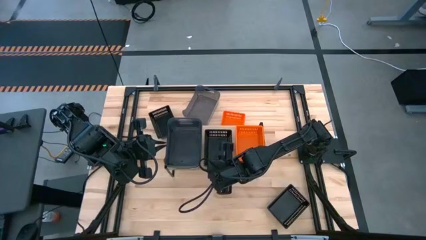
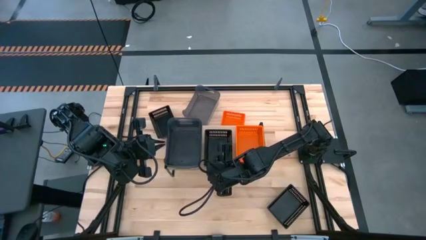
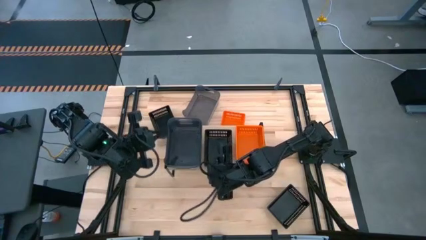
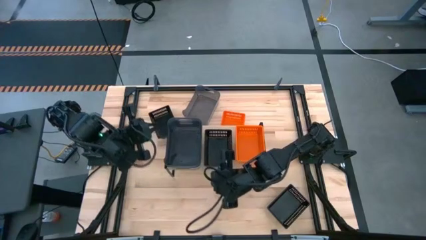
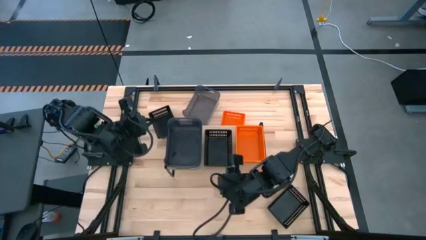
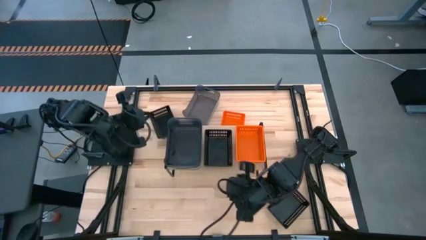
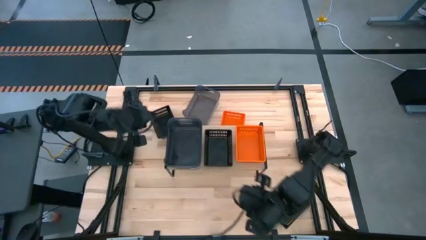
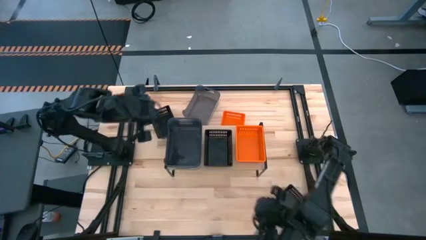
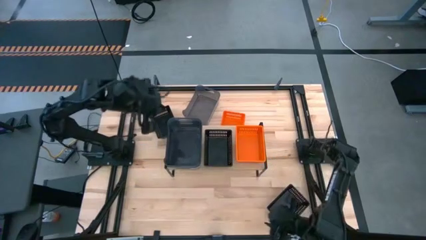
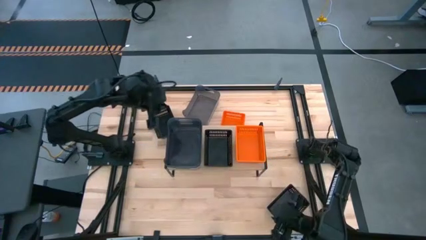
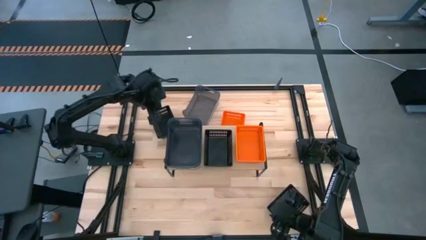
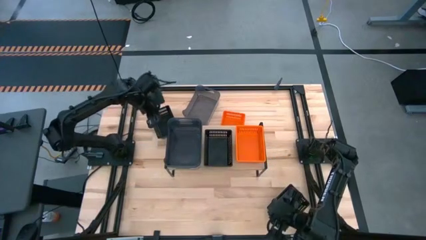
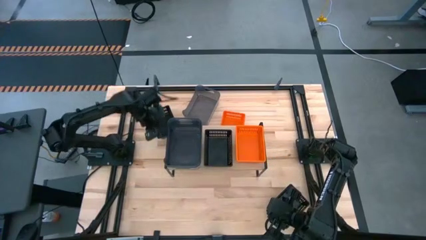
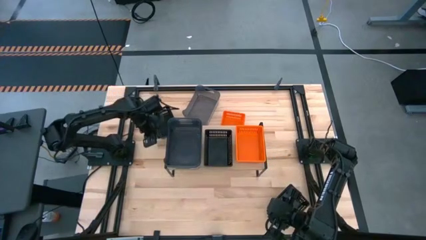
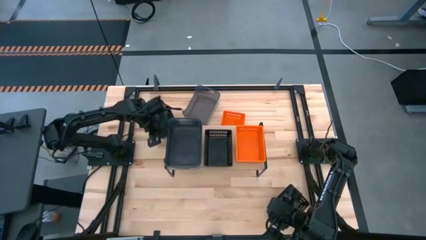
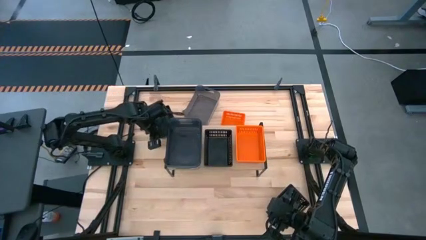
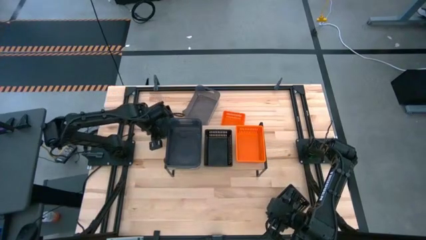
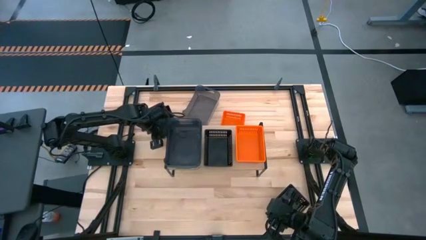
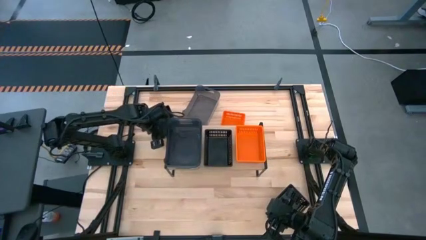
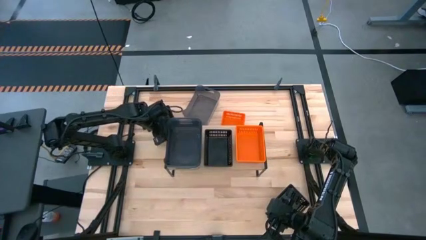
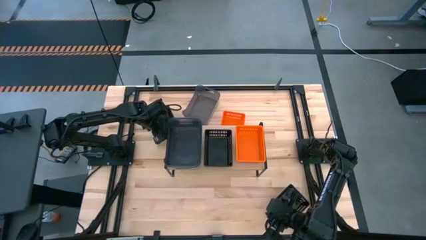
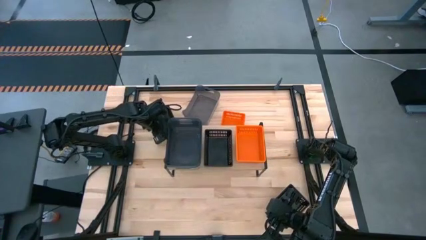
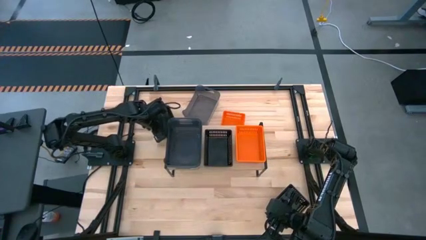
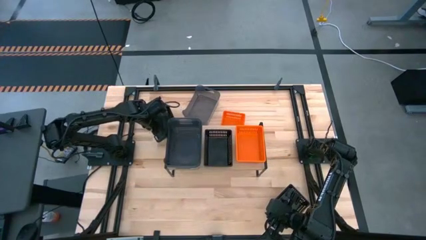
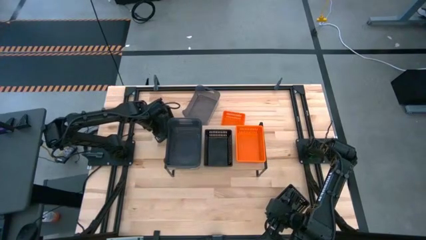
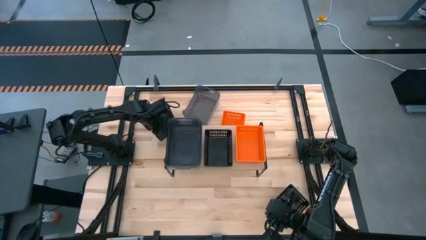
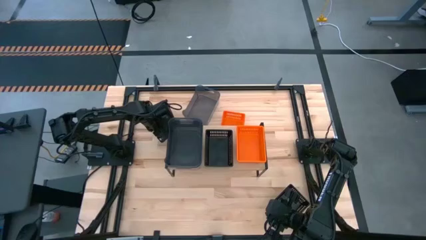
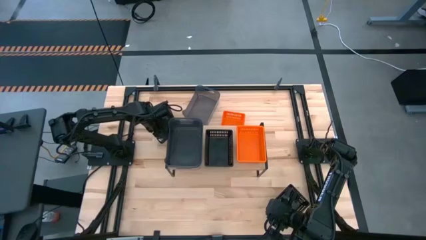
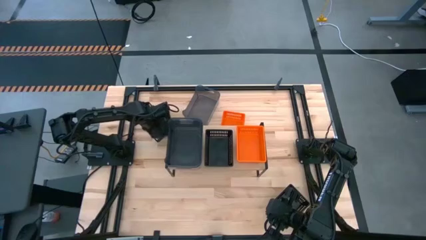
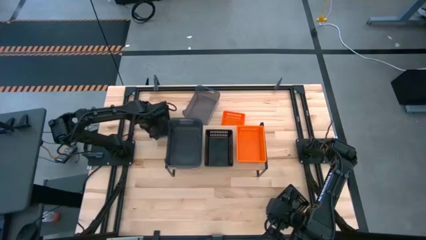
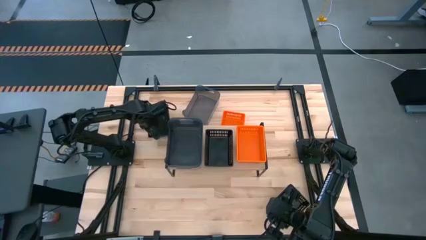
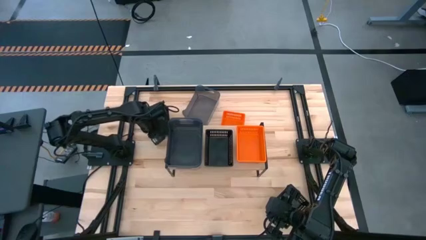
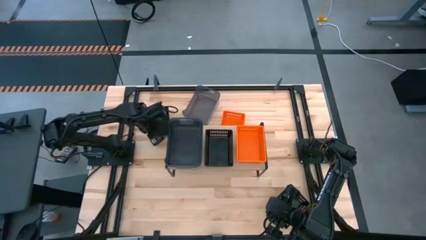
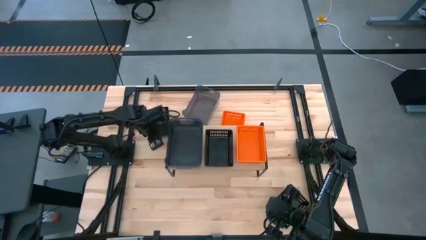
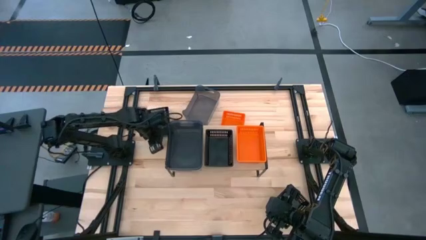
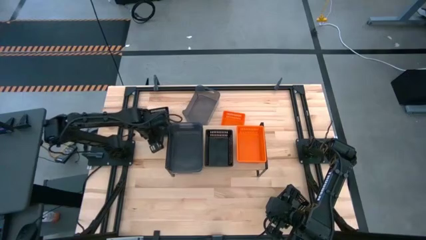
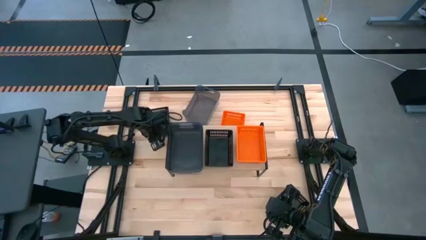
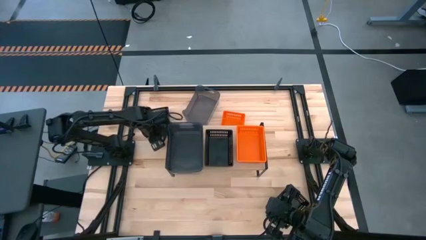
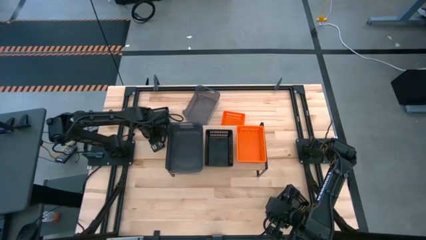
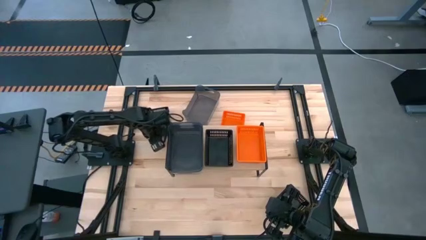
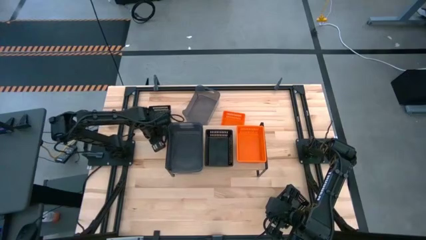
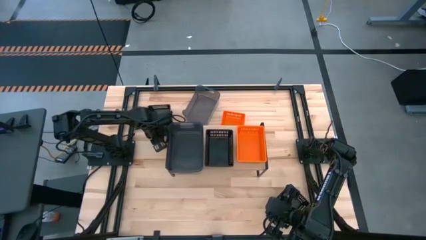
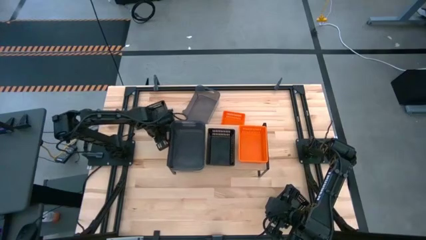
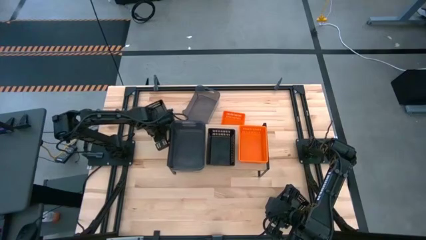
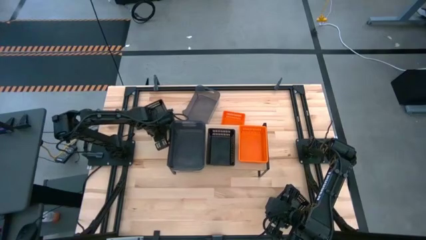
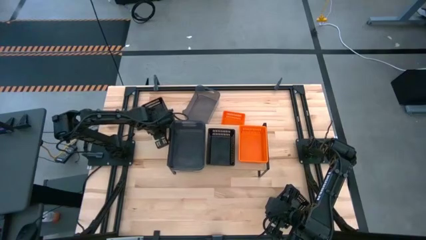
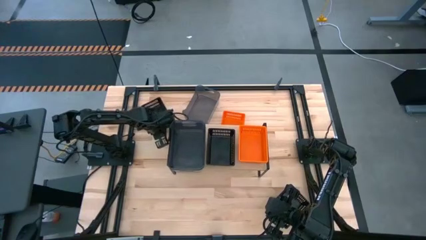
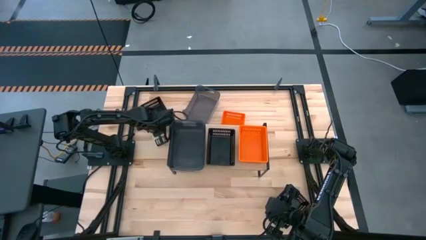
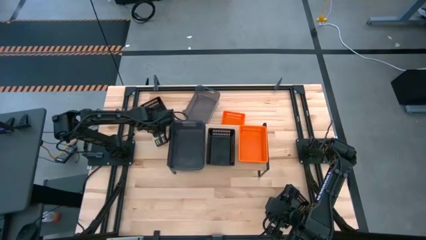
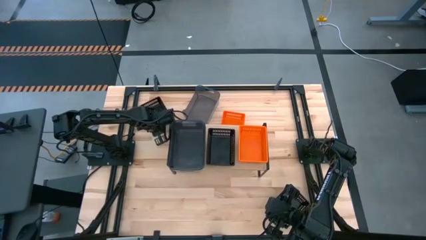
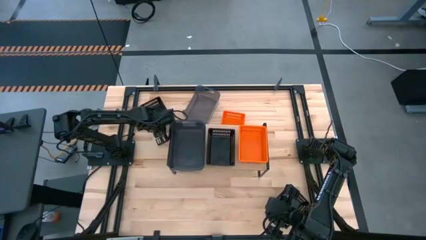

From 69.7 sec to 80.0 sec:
Task: Stack baskets on shelf by color
Stack the top black bin on top of the black bin on the shelf

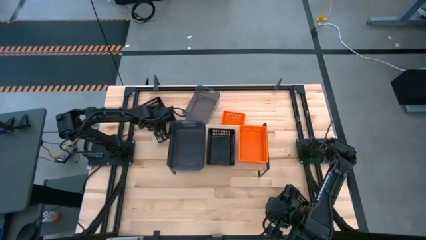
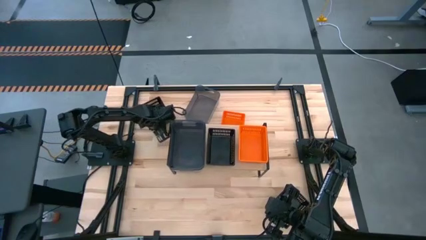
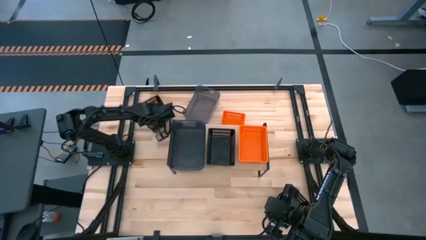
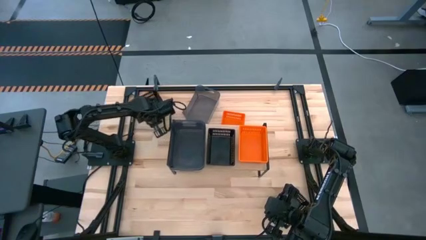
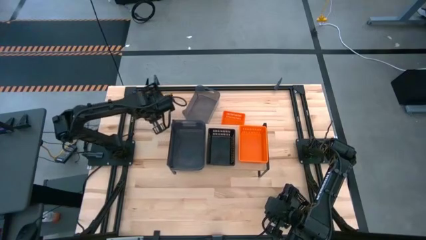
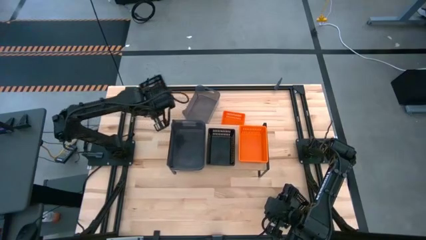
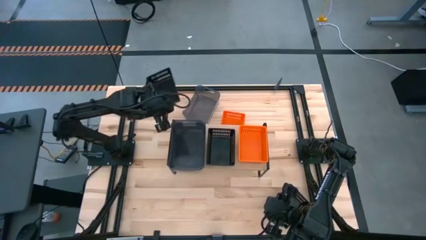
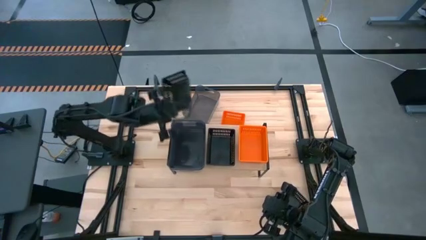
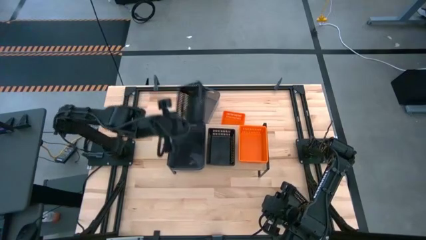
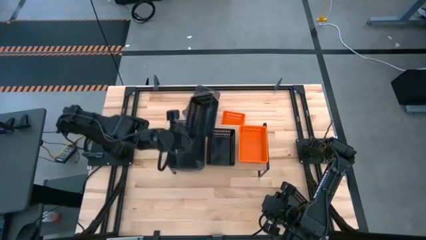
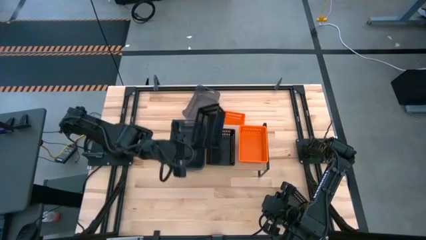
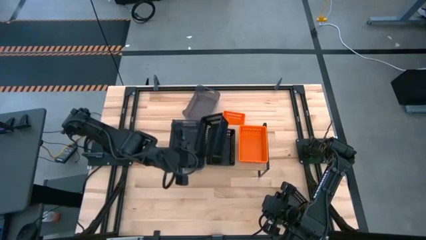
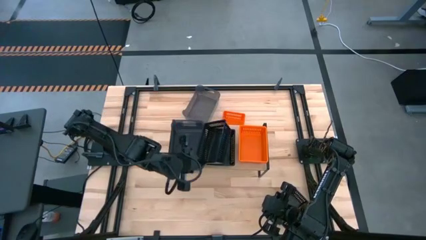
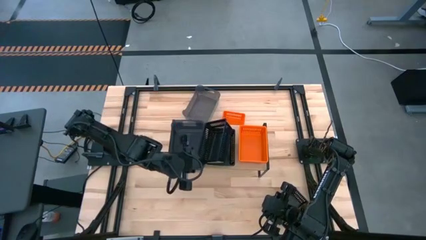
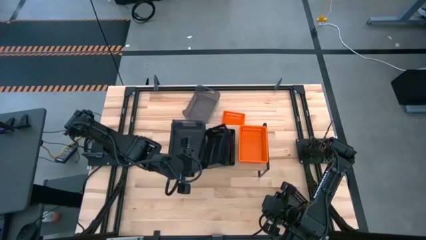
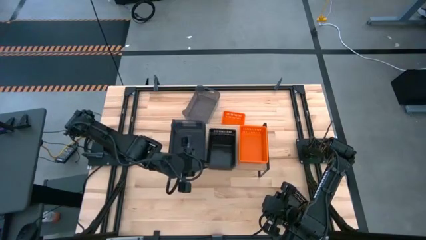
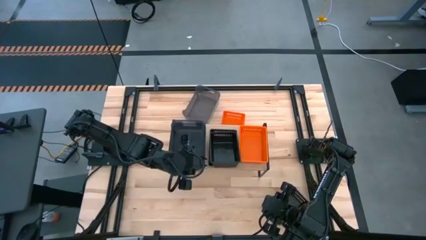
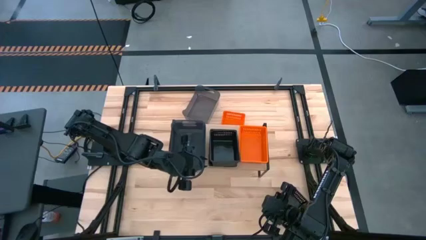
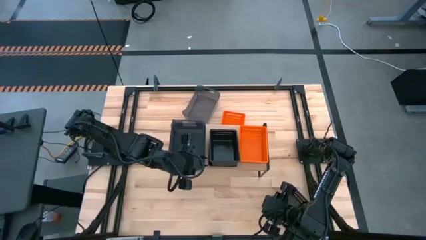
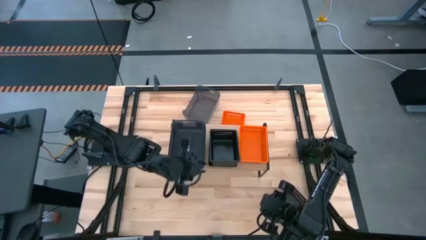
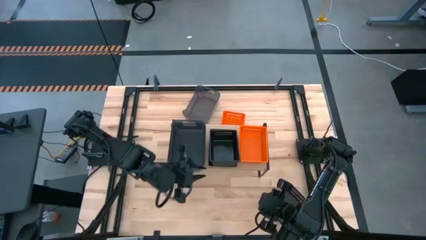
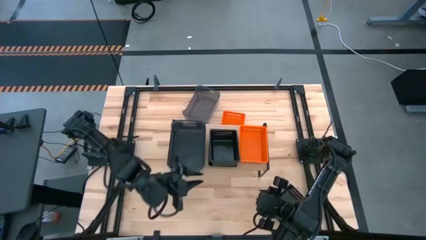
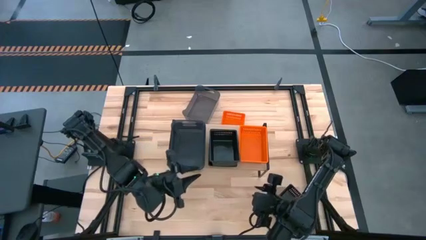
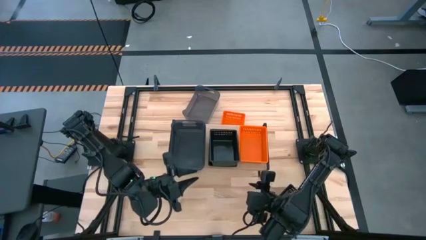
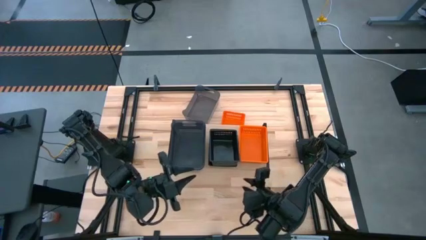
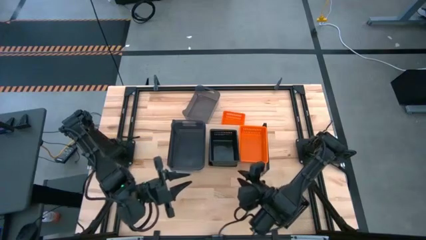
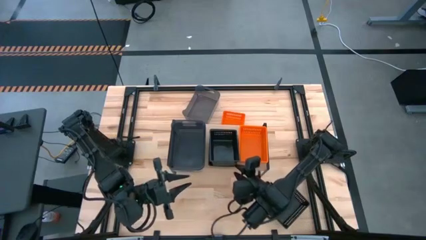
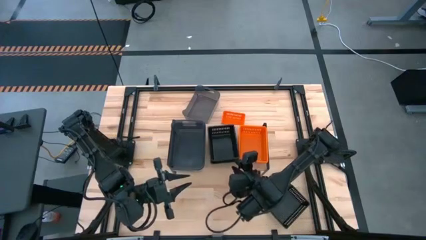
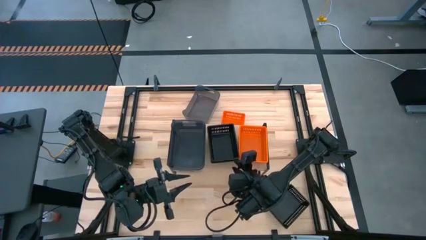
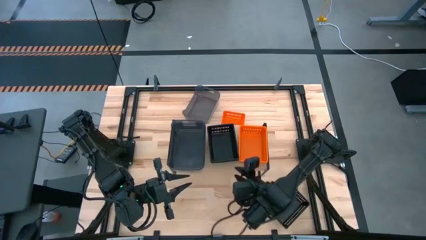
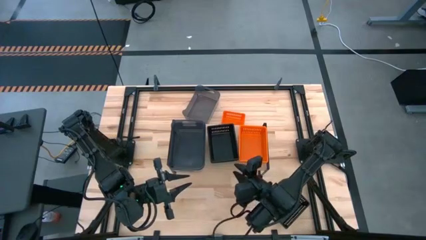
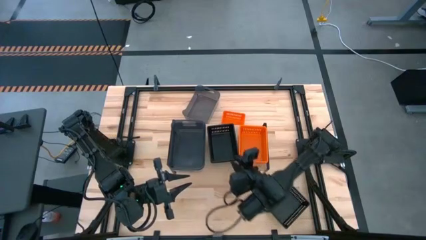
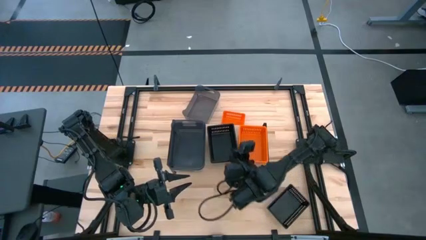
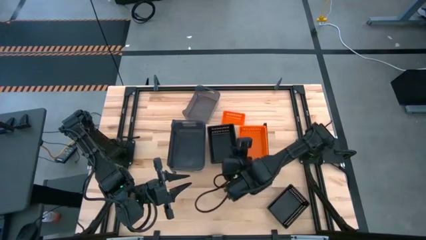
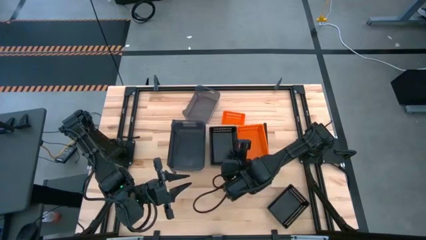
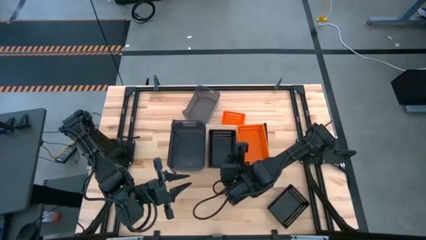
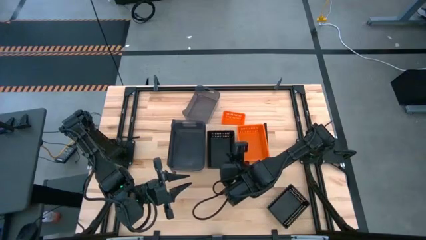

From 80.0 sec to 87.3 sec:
Stack the top black bin on top of the black bin on the shelf
